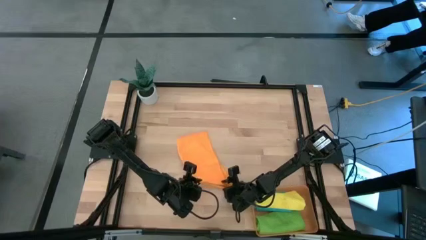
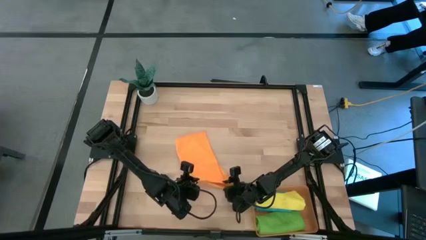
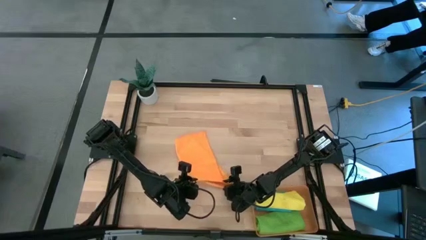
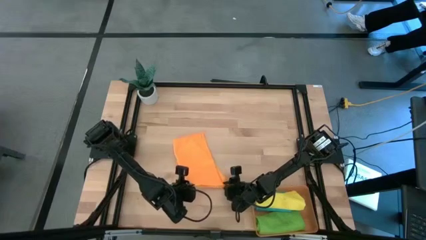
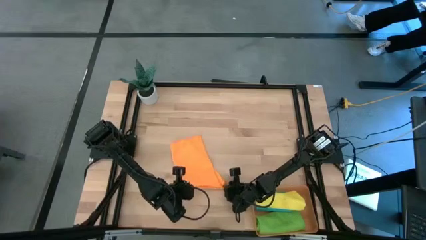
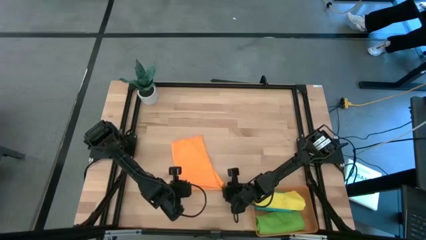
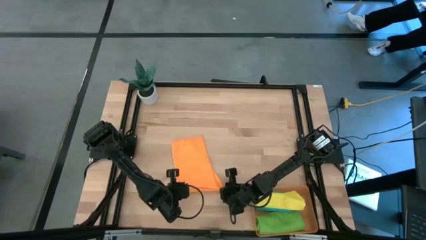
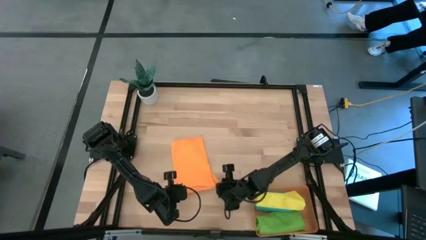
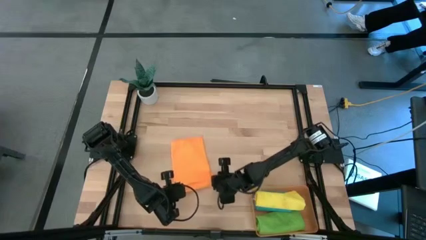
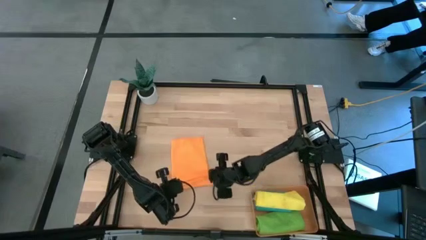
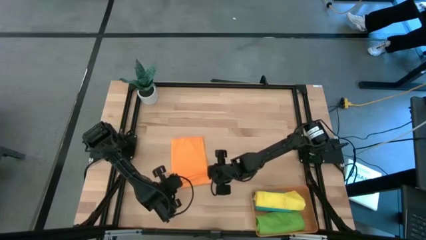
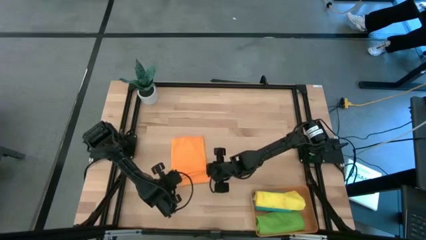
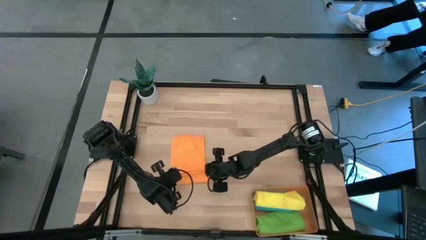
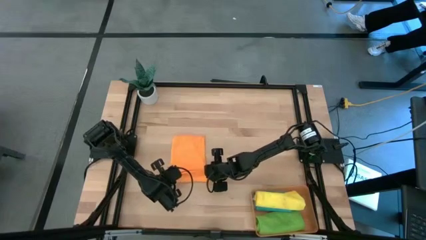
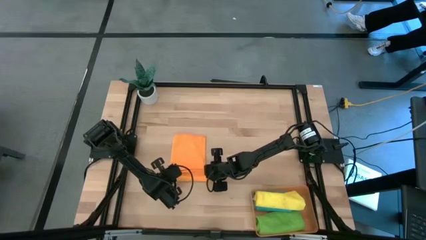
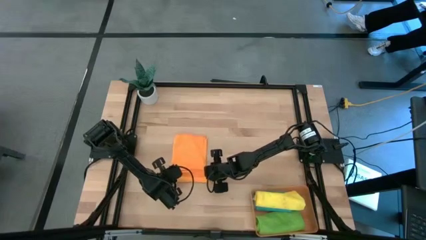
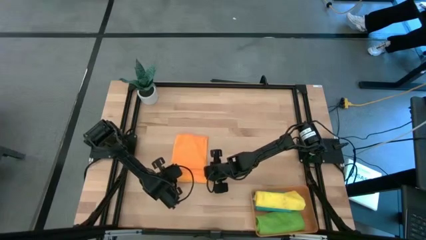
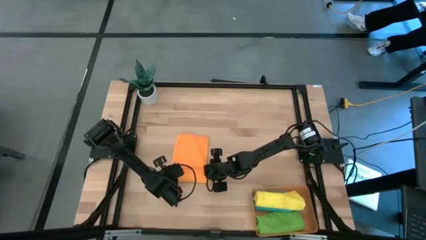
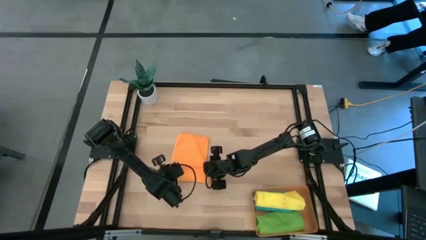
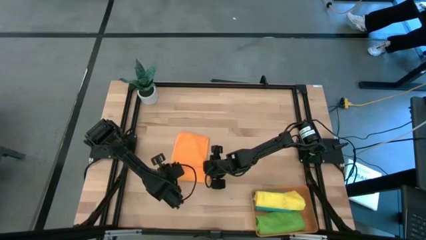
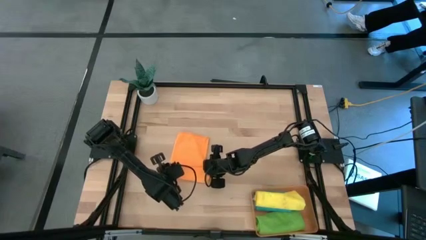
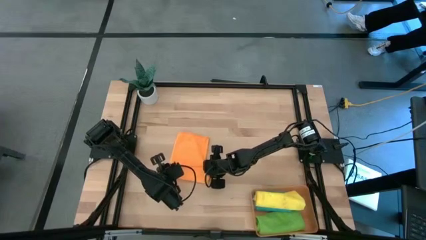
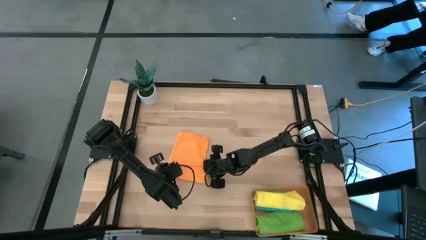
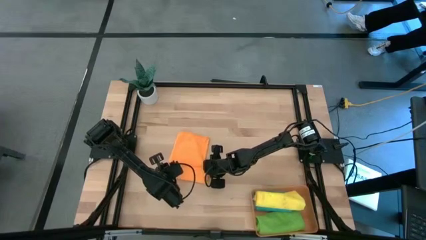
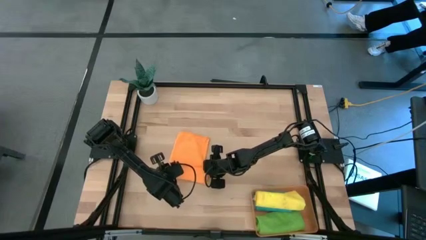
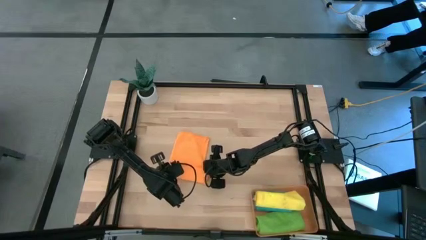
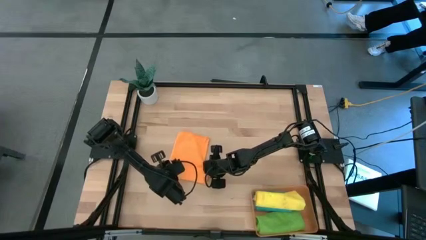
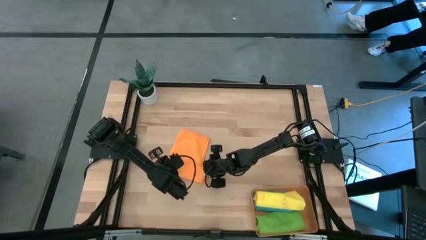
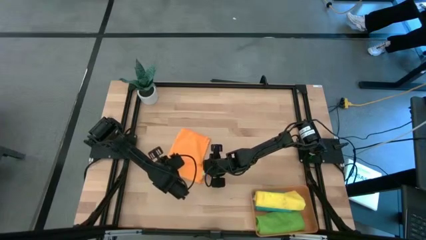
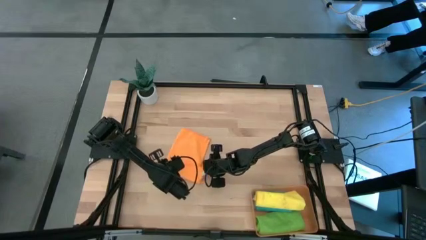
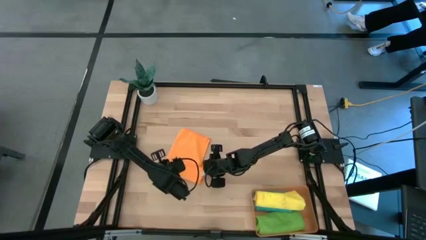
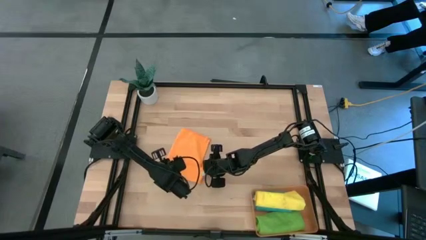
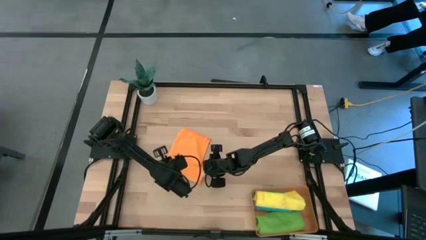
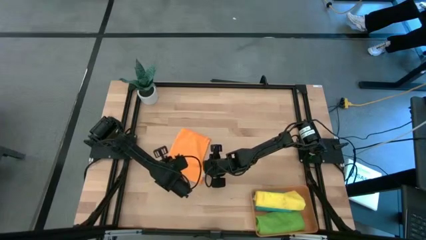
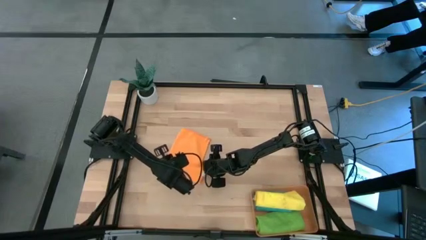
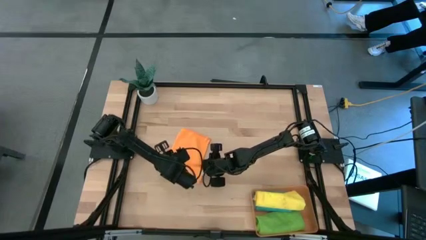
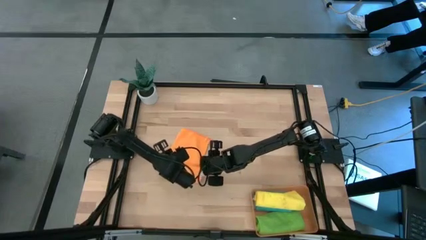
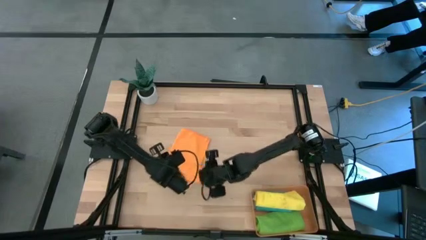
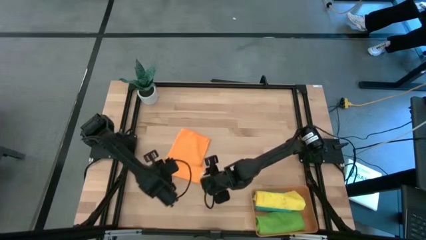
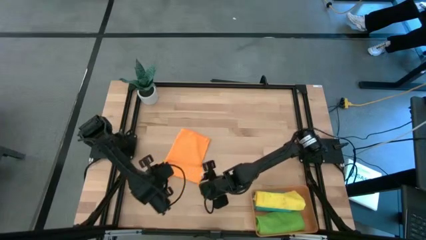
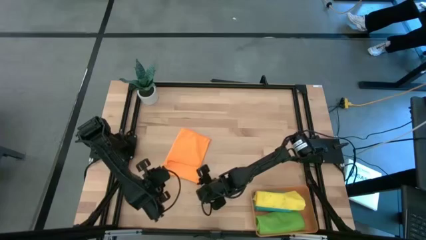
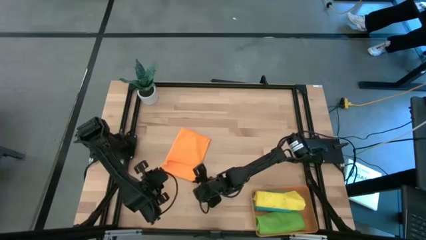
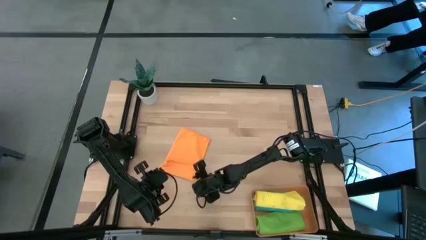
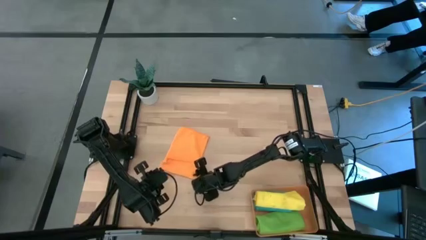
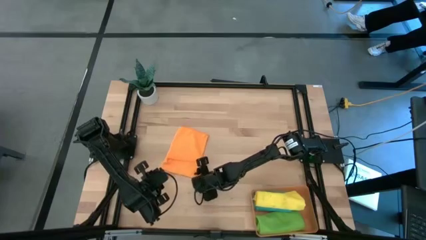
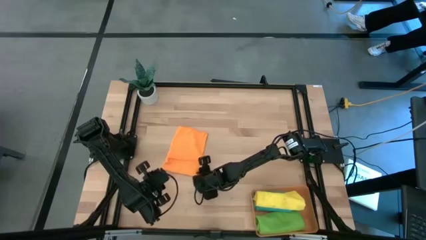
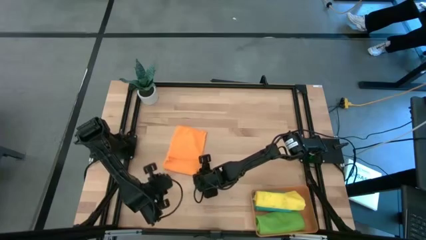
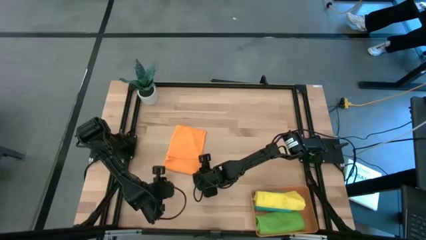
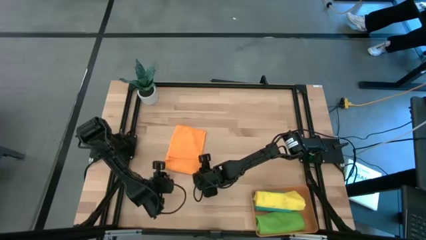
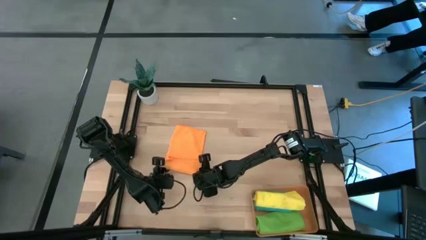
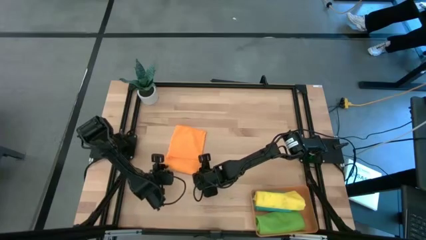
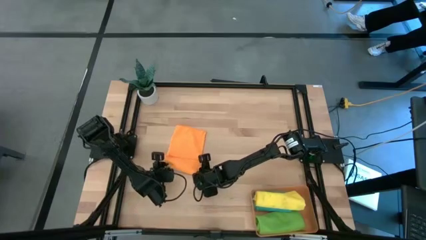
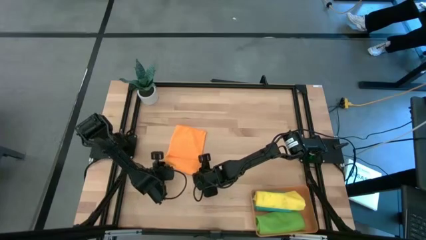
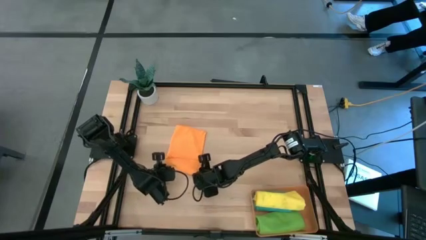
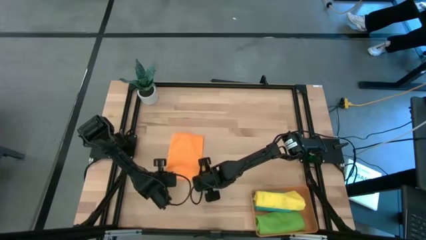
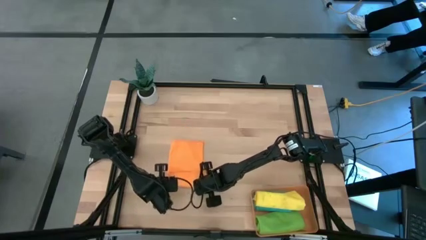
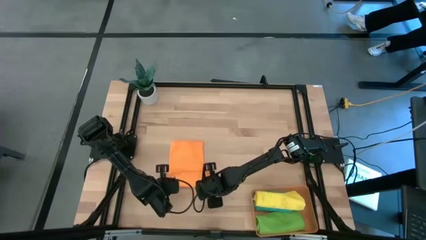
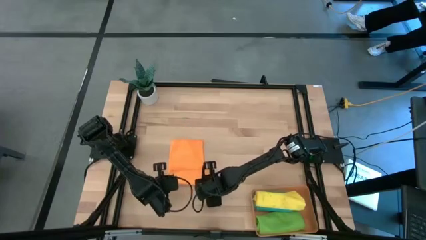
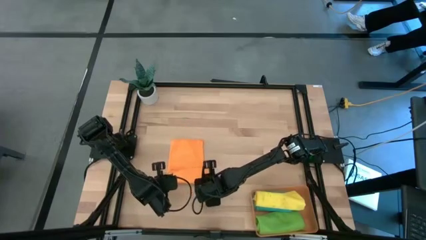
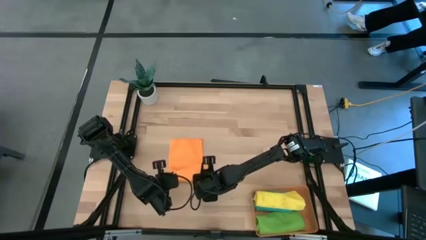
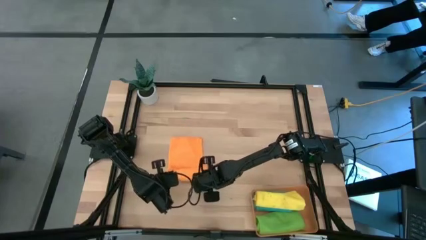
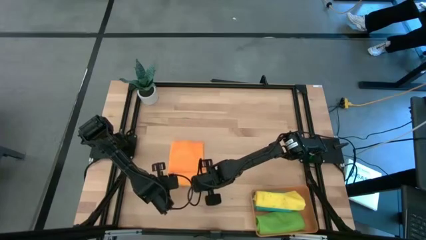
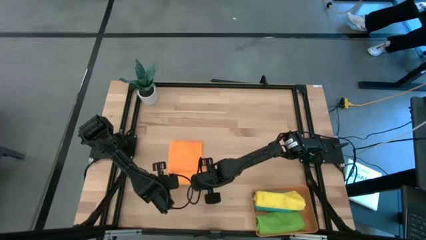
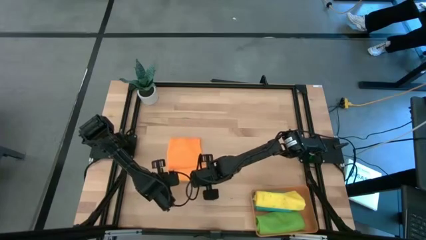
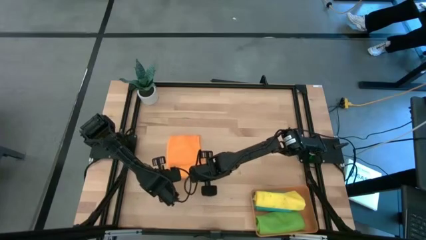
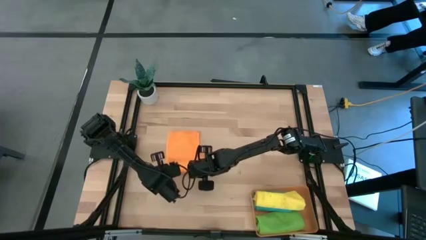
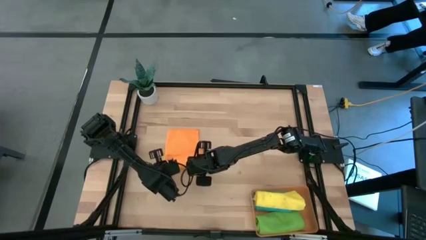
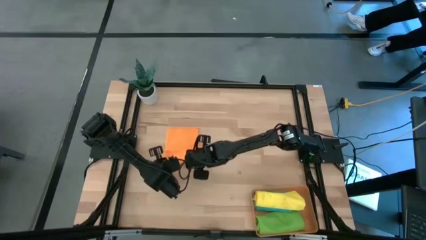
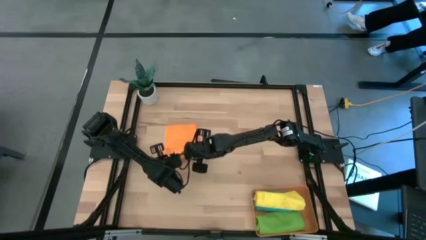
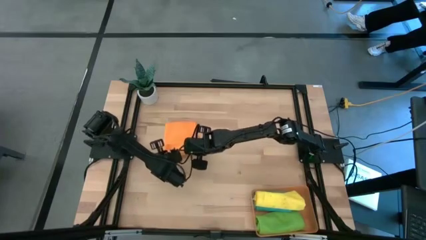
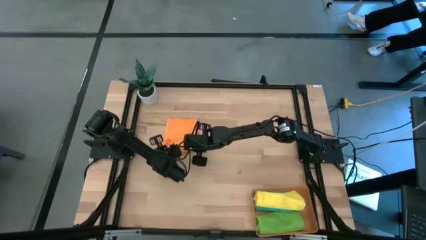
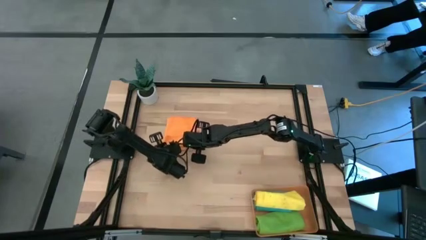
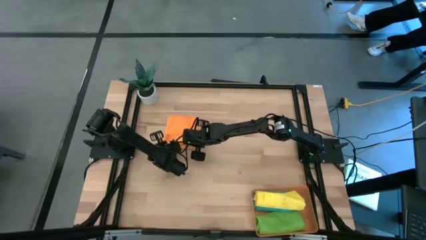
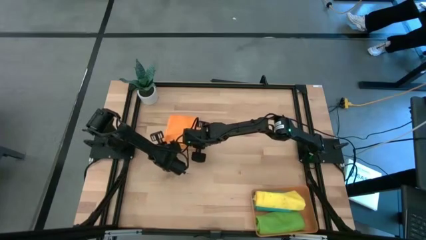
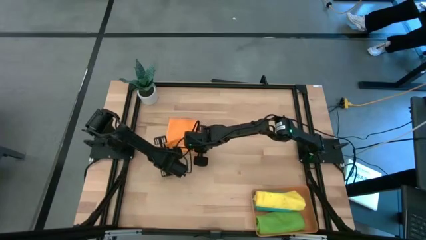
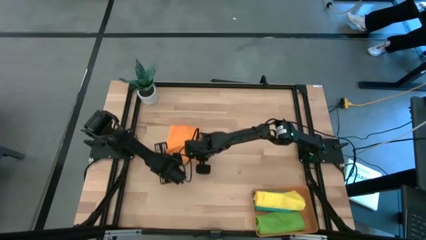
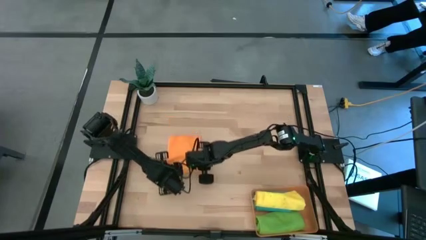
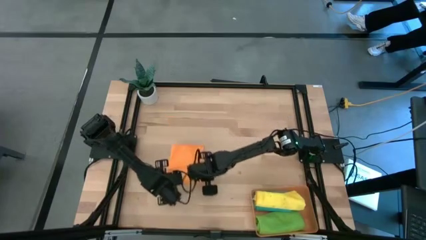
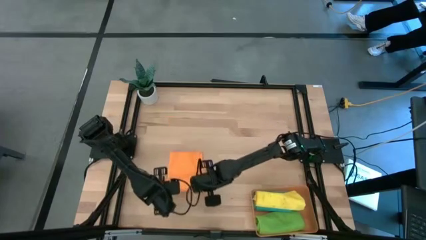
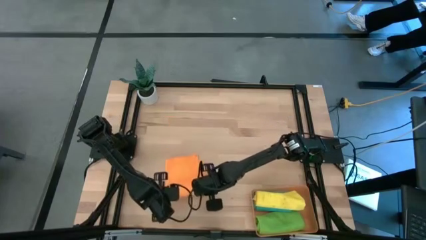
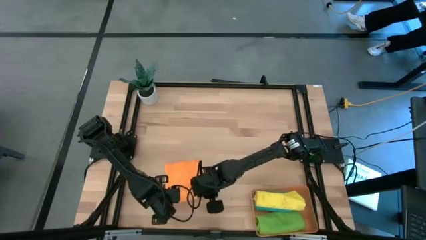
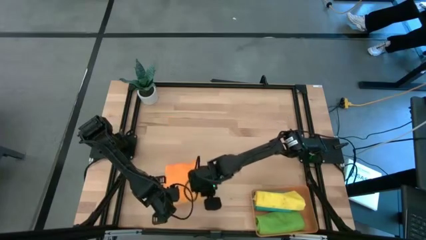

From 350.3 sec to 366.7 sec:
Task: Roll microfiber towels into tight, uniform cylinder then place into a basket
Roll the orange microfiber towel
